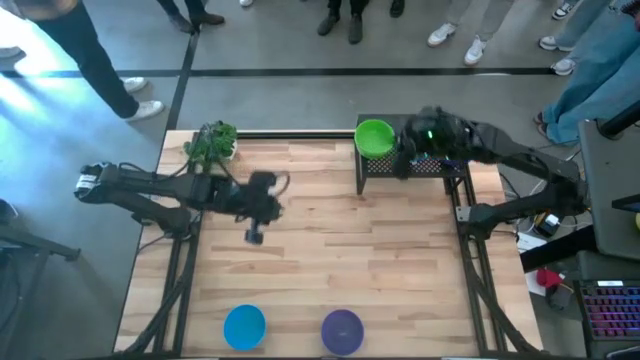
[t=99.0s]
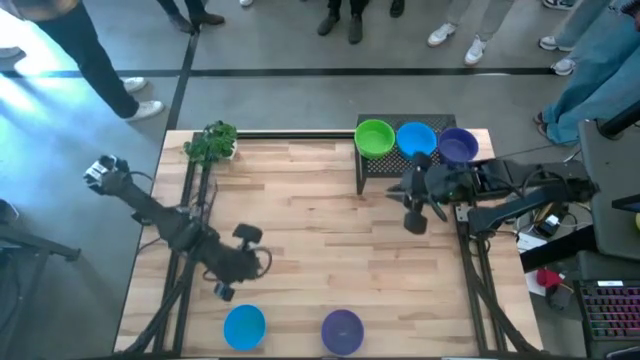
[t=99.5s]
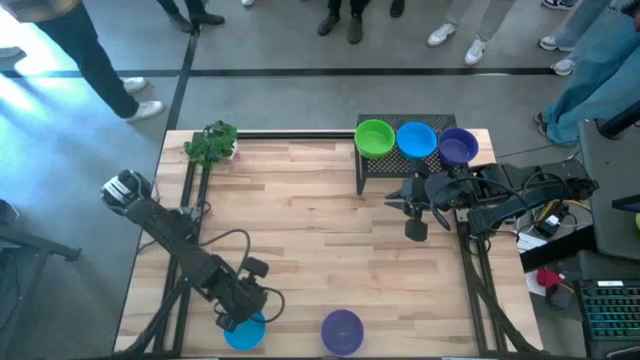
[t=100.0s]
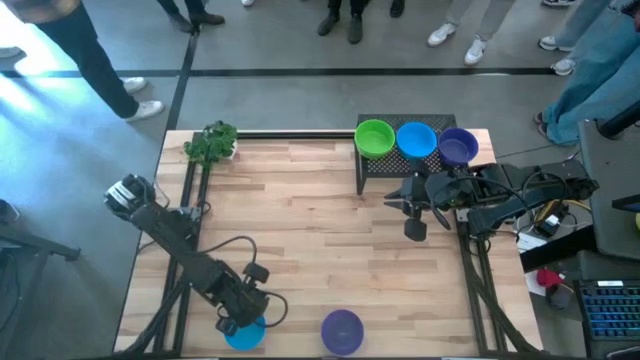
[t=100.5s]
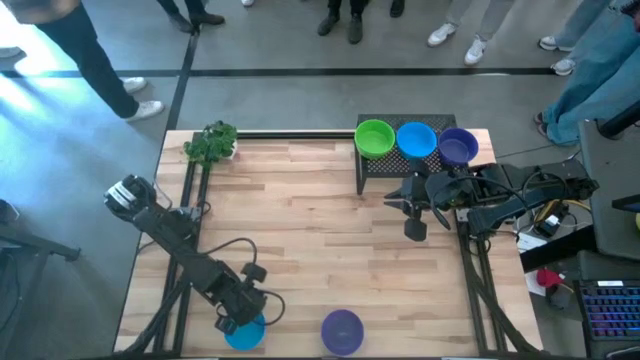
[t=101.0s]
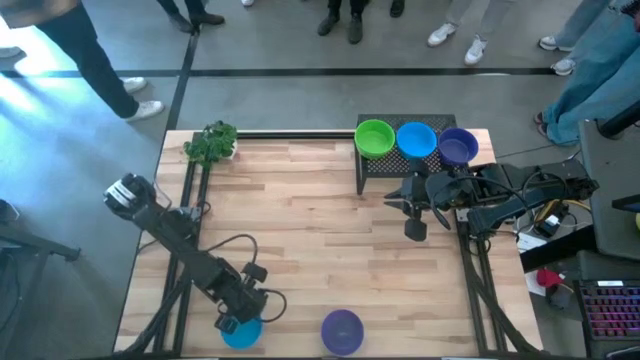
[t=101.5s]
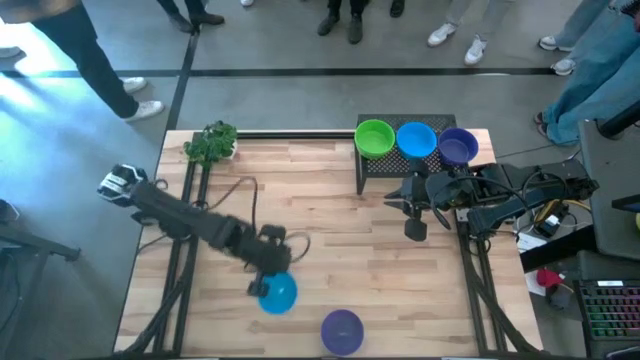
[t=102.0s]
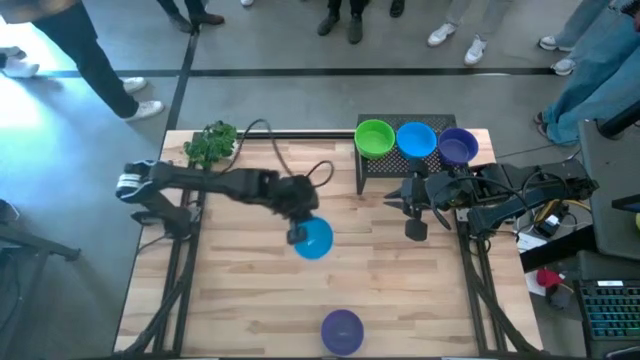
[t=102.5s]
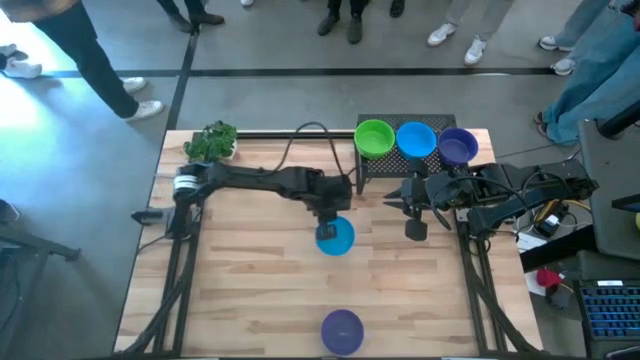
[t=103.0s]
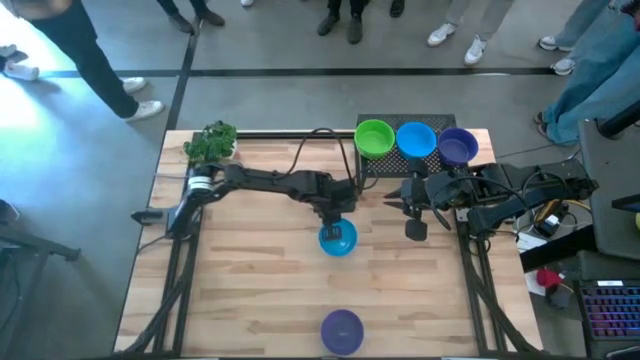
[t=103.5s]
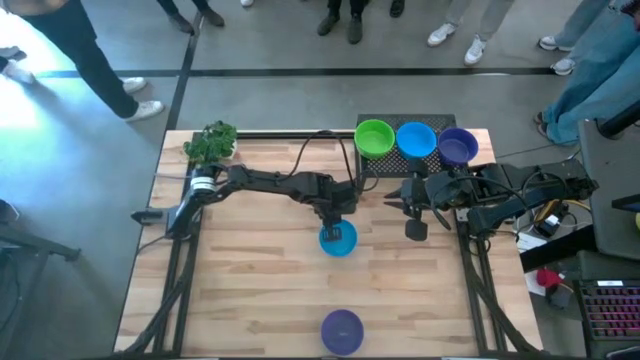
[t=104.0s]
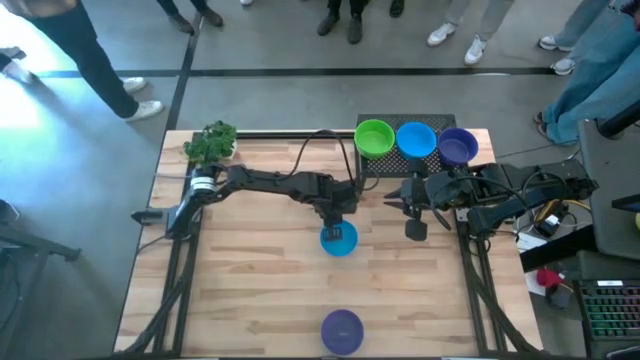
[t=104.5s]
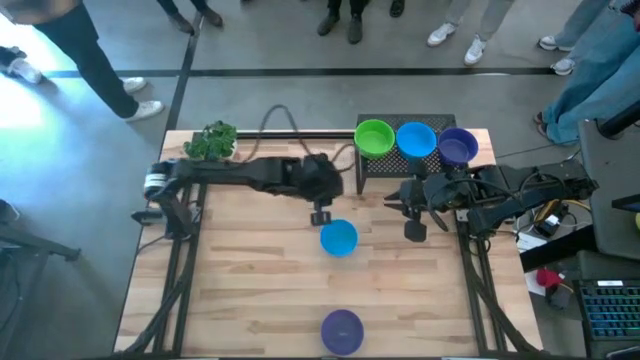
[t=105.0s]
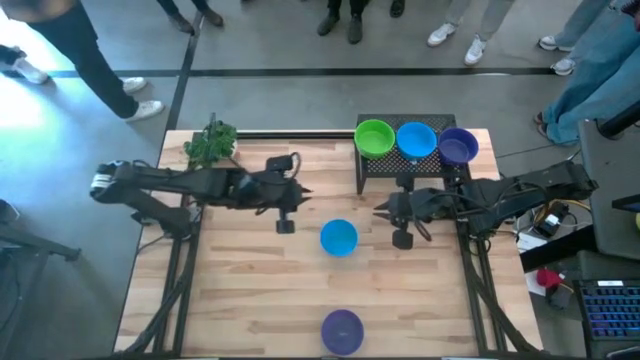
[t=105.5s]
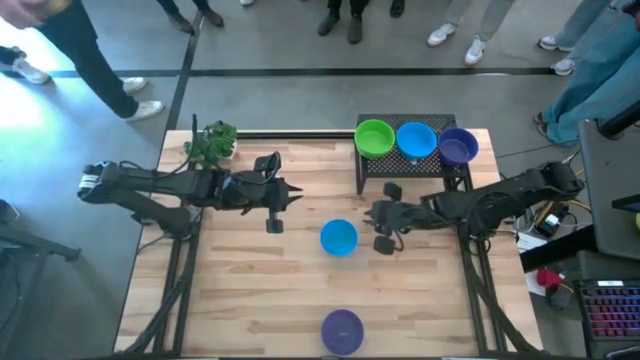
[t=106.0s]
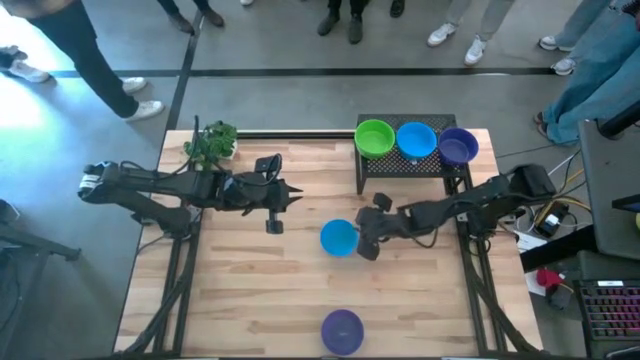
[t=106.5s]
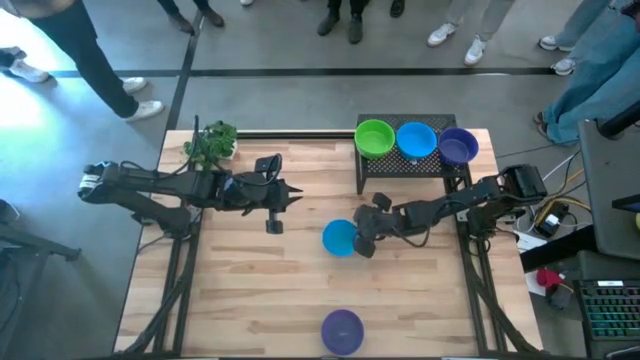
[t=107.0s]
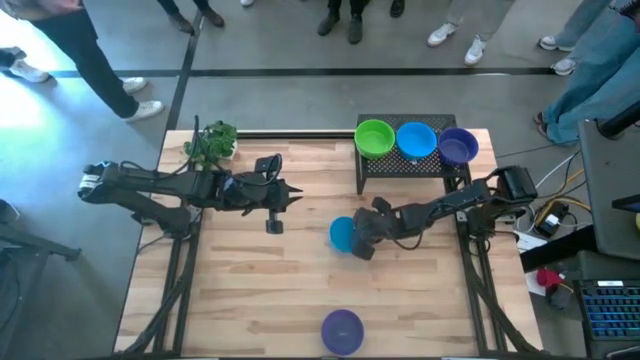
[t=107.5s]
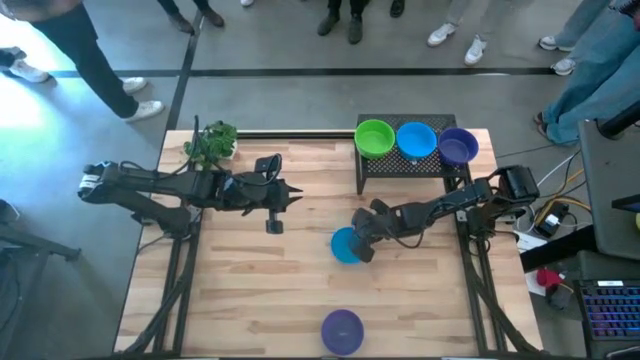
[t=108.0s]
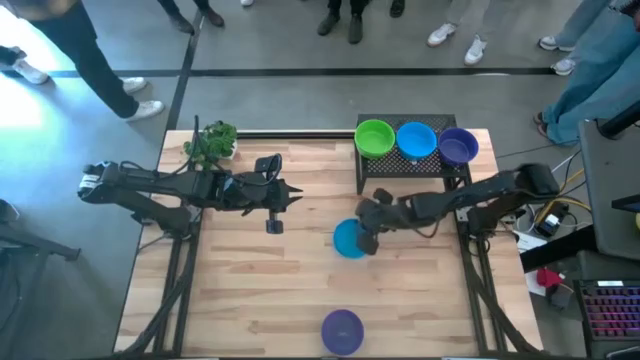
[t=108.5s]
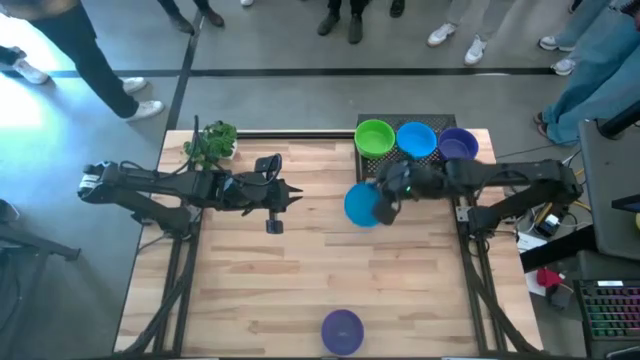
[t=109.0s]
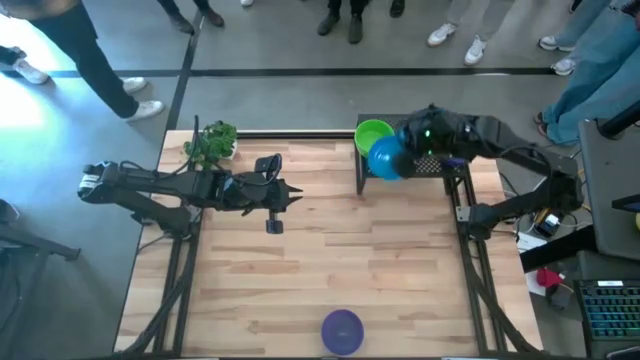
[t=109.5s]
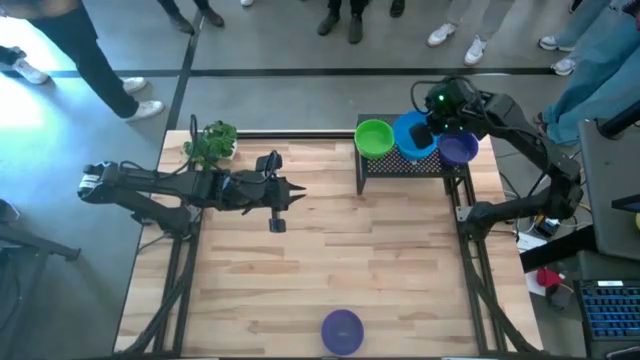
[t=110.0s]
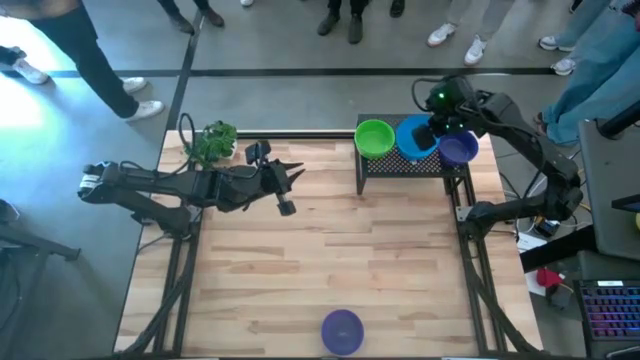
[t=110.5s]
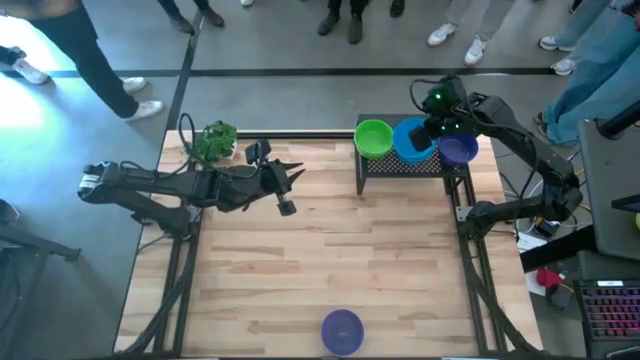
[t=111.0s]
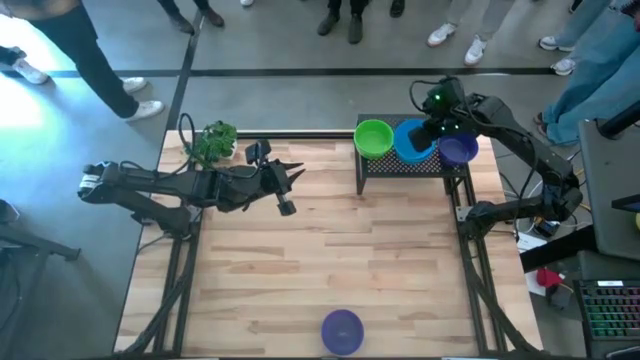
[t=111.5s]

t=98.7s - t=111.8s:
Task: Pick & Place Mini bowls
Stack the blue bowl on top of the blue bowl on the shelf

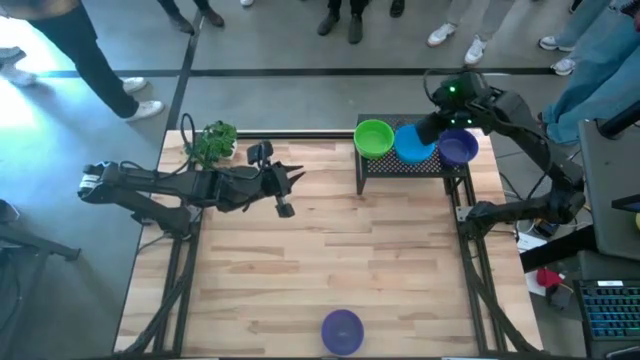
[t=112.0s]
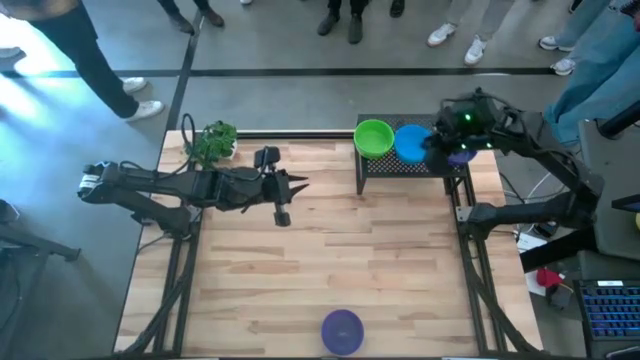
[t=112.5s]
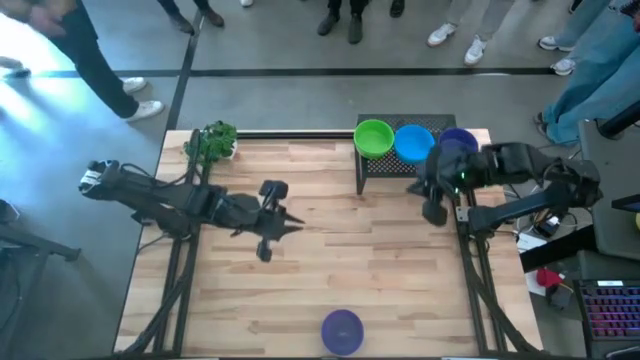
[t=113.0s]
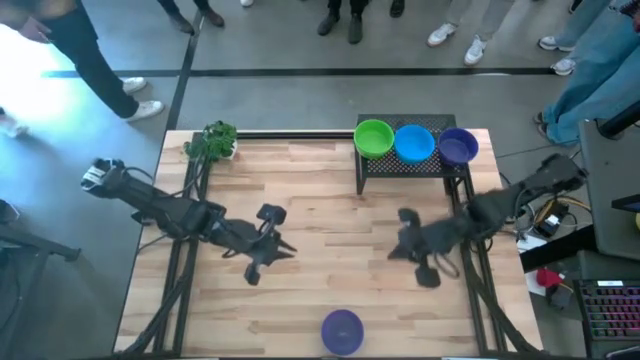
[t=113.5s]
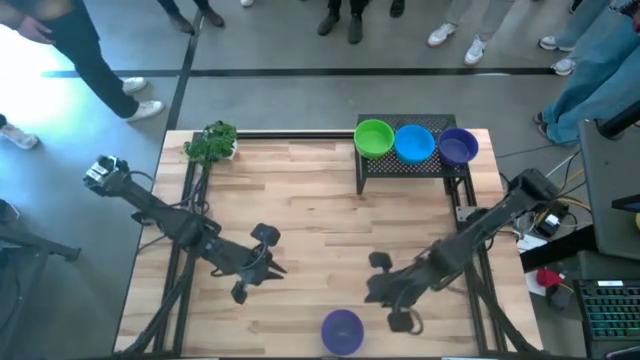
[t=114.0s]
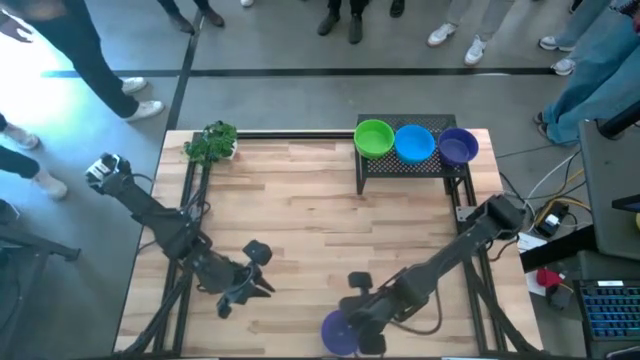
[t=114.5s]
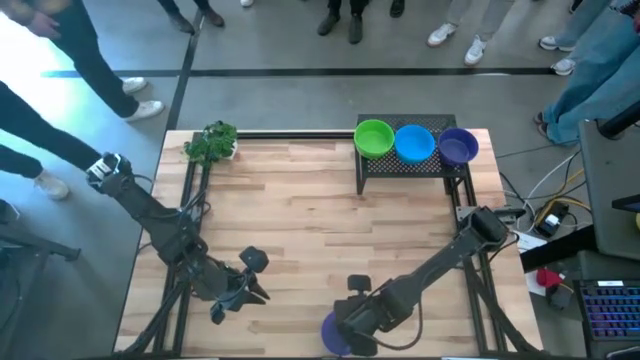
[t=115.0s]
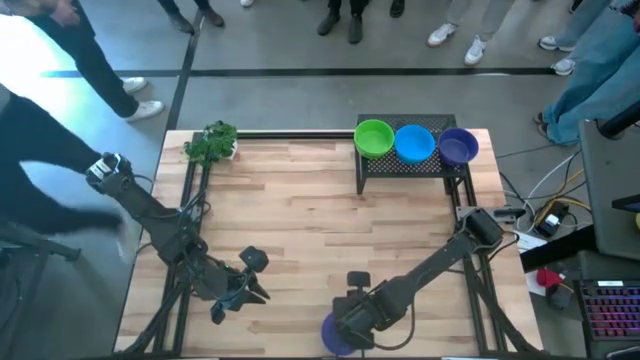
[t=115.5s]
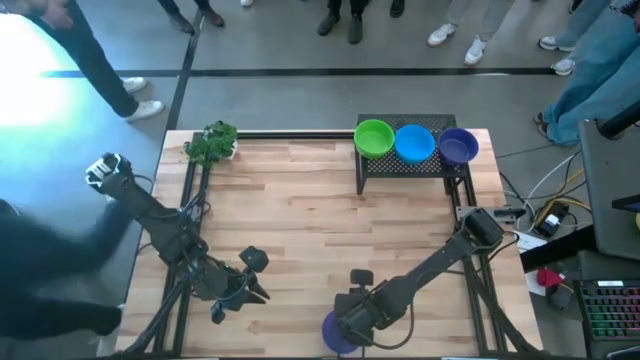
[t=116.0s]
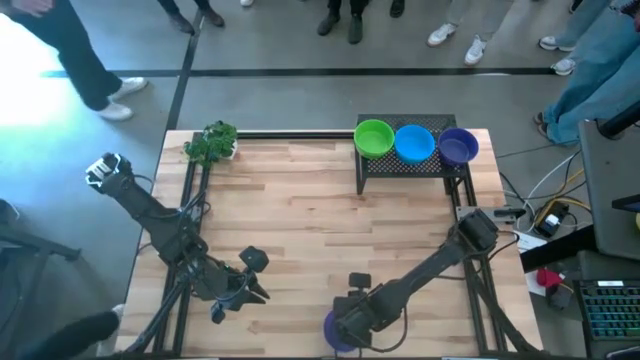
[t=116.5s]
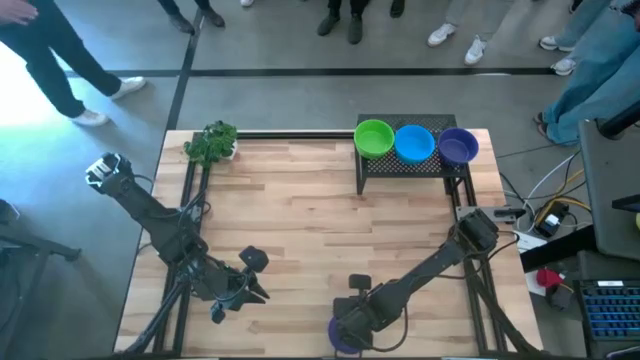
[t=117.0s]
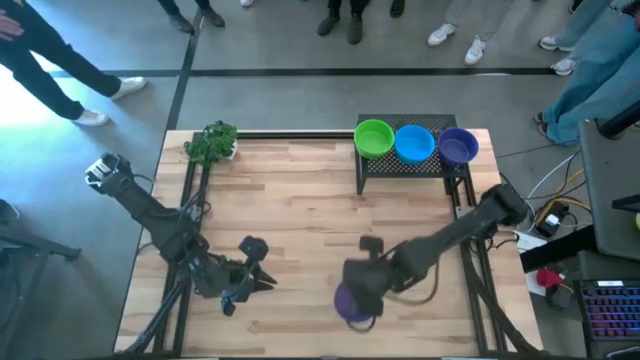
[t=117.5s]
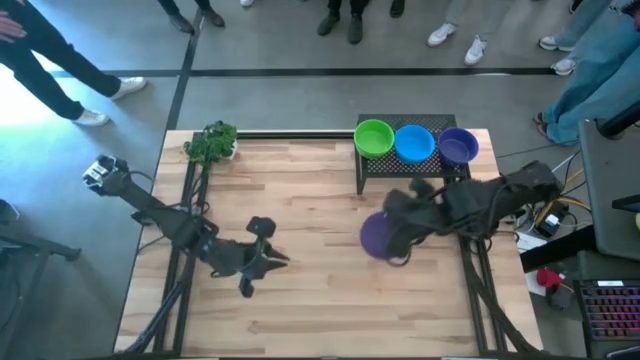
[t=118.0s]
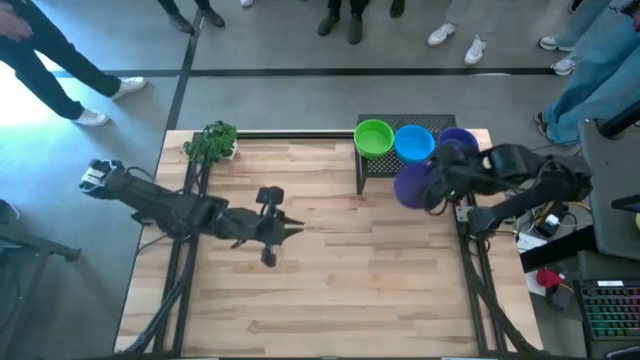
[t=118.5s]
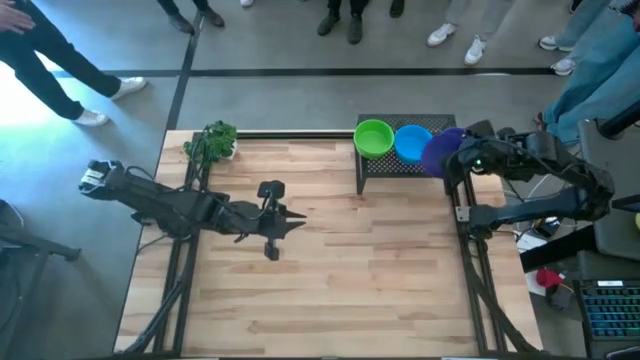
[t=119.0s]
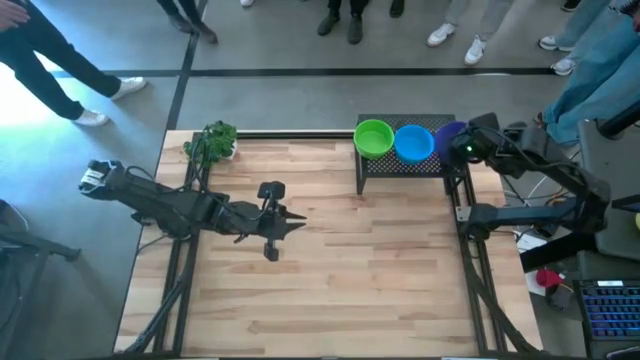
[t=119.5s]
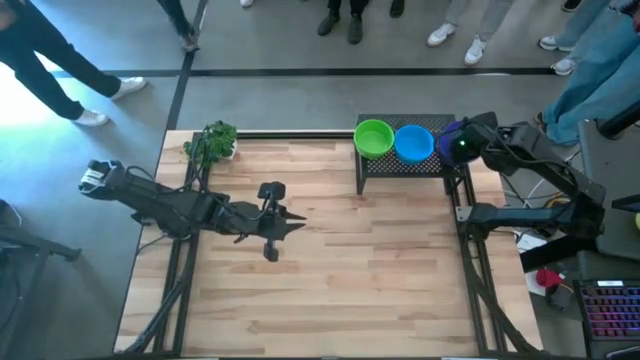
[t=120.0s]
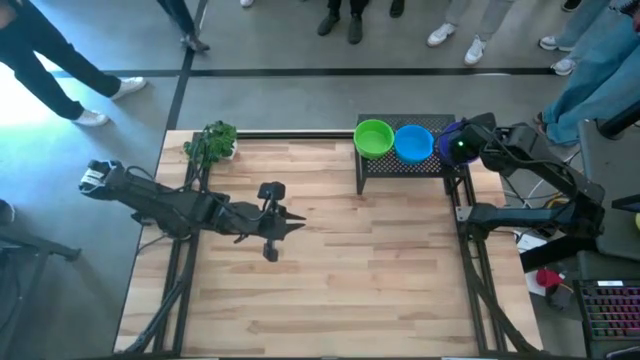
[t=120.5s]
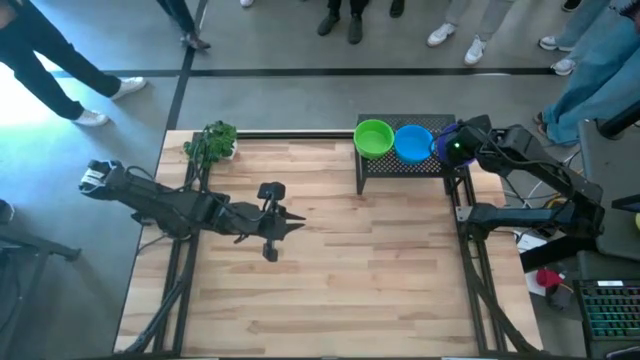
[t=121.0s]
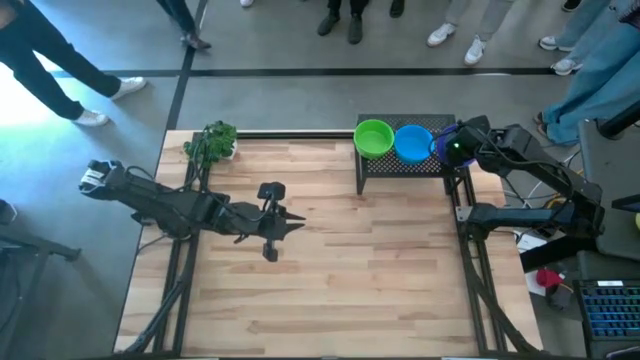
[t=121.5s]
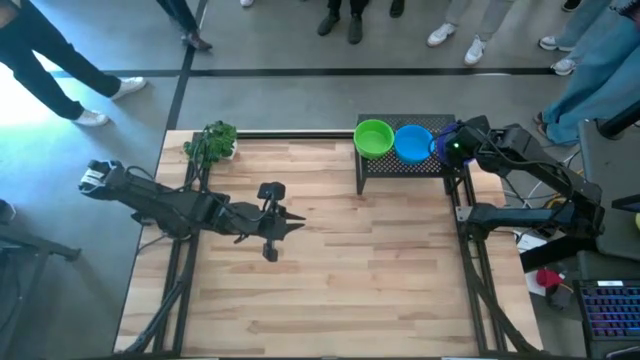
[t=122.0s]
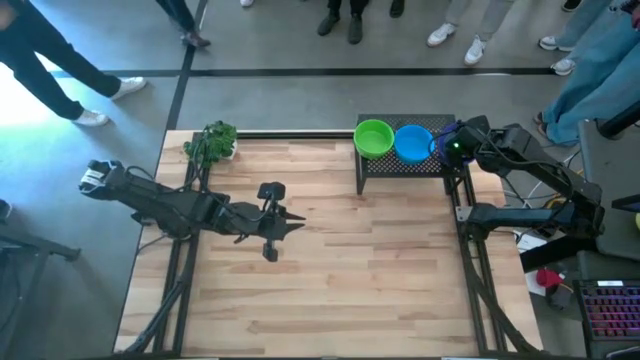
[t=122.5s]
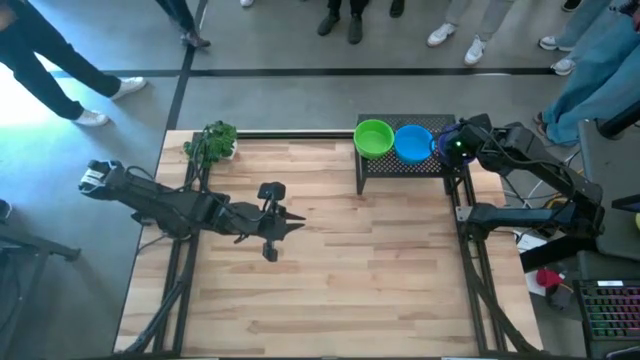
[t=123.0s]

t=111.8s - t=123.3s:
Stack the violet bowl on top of the violet bowl on the shelf
